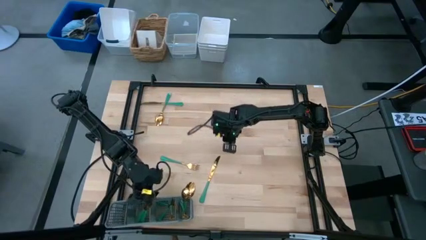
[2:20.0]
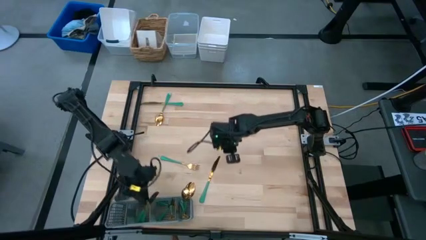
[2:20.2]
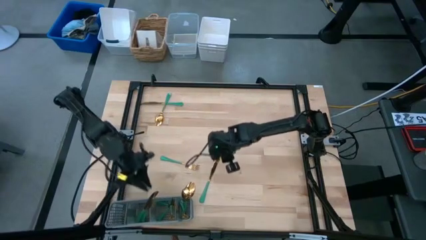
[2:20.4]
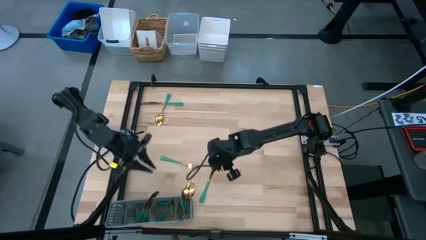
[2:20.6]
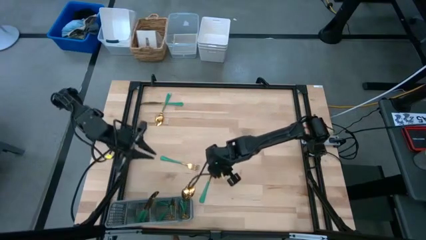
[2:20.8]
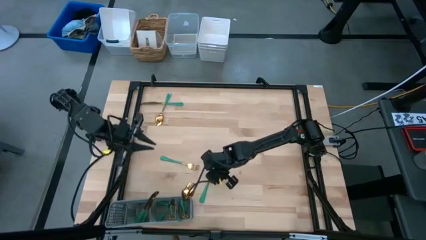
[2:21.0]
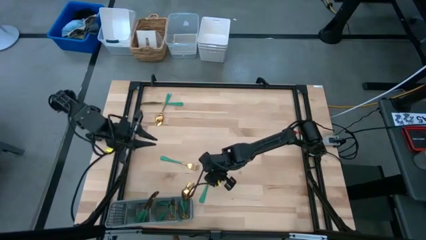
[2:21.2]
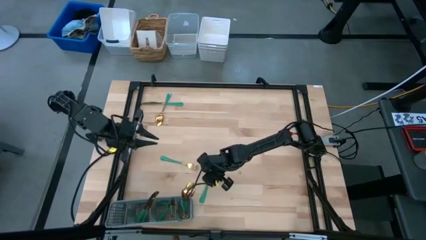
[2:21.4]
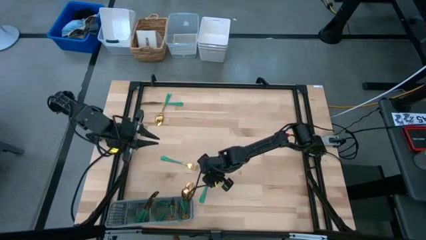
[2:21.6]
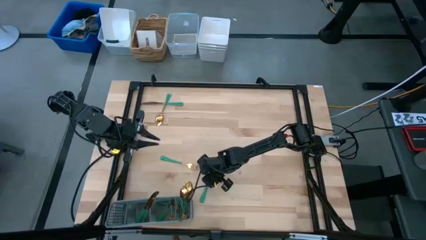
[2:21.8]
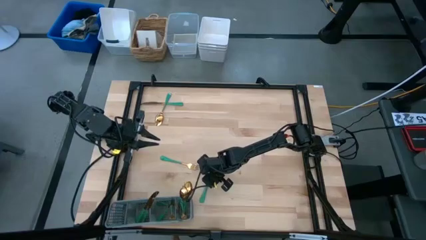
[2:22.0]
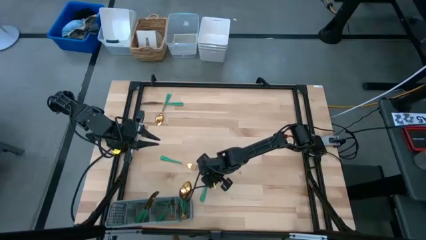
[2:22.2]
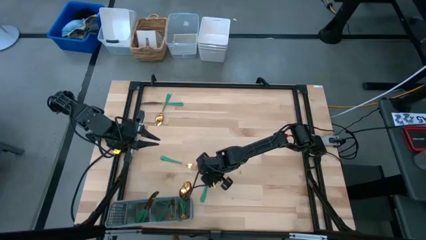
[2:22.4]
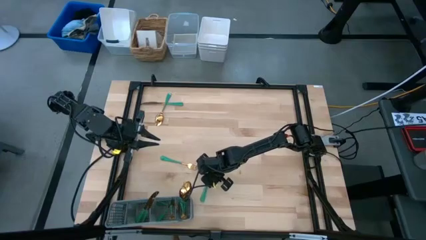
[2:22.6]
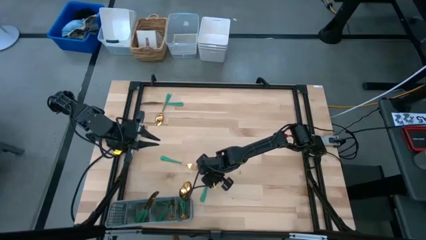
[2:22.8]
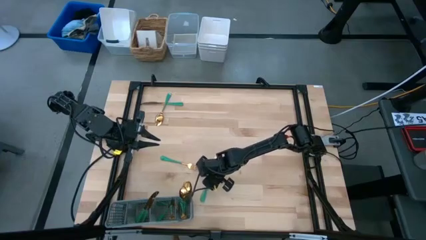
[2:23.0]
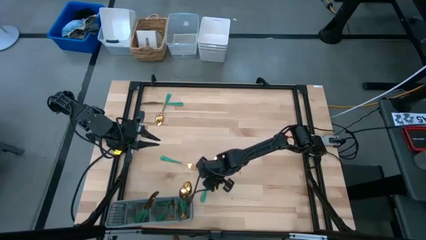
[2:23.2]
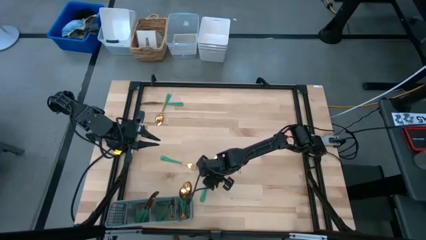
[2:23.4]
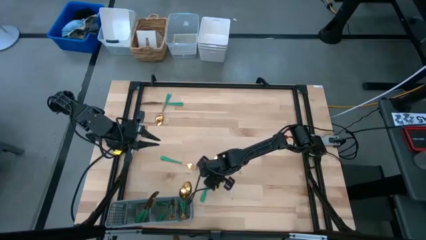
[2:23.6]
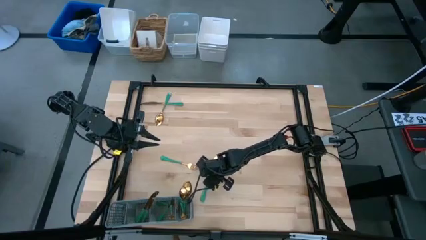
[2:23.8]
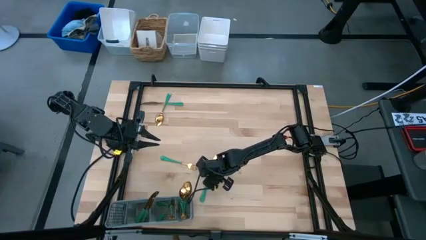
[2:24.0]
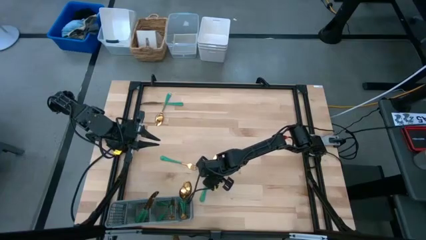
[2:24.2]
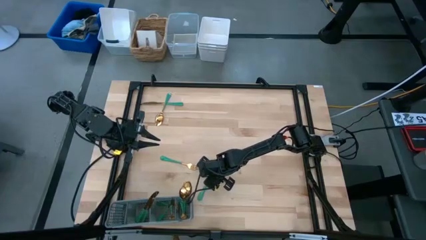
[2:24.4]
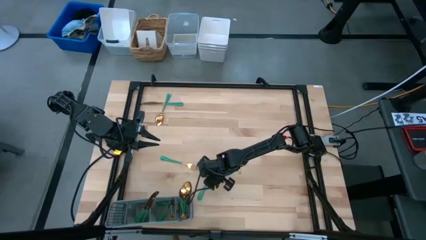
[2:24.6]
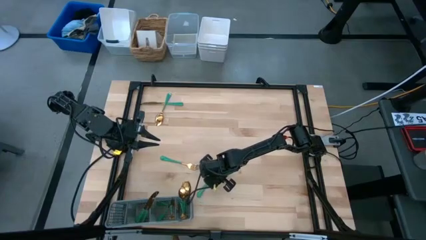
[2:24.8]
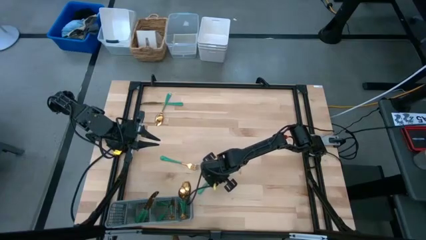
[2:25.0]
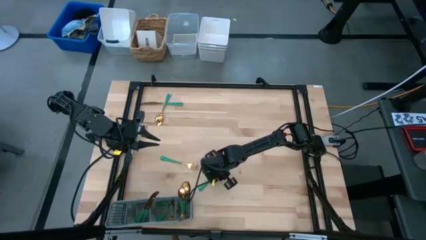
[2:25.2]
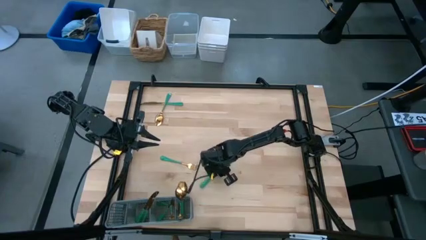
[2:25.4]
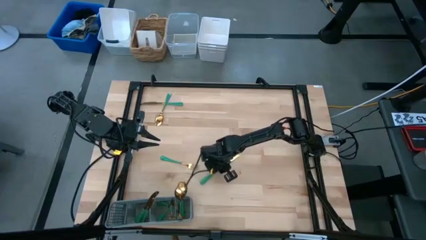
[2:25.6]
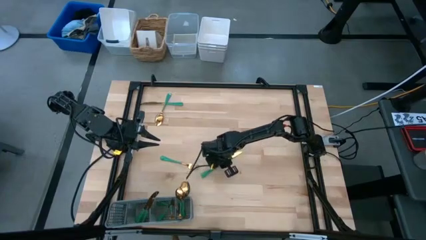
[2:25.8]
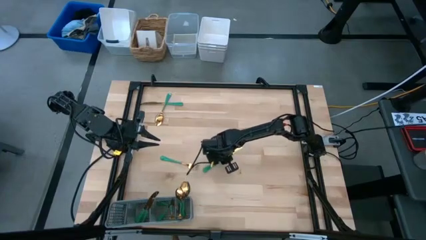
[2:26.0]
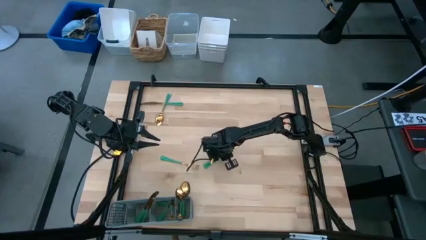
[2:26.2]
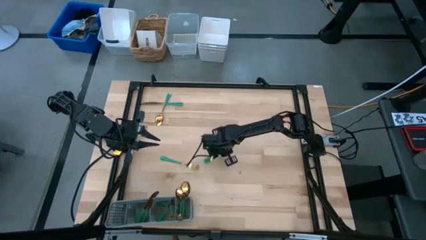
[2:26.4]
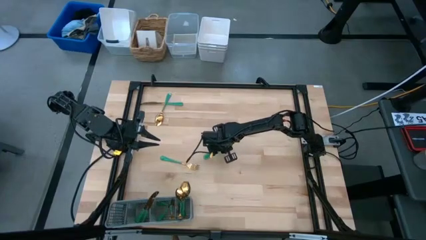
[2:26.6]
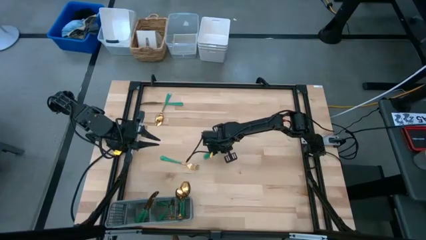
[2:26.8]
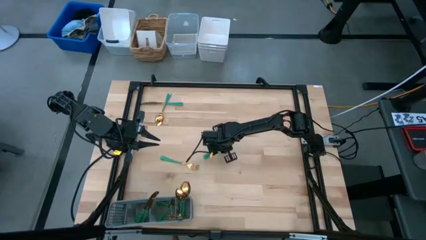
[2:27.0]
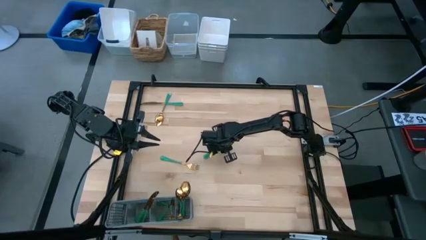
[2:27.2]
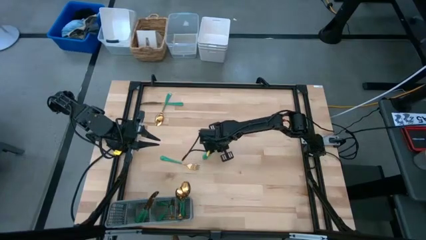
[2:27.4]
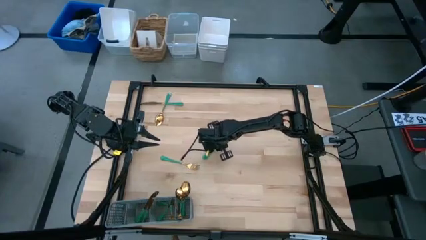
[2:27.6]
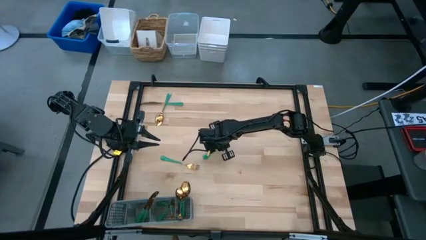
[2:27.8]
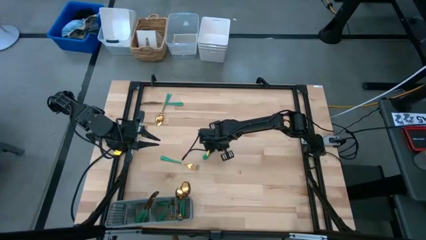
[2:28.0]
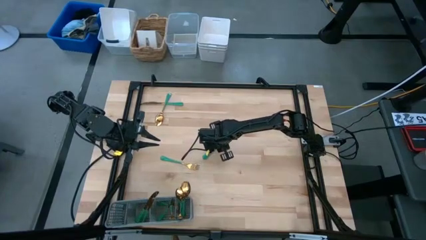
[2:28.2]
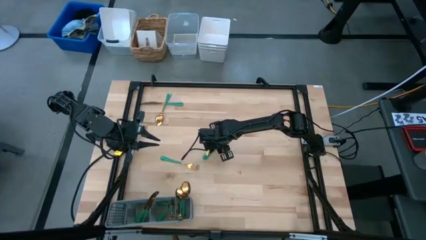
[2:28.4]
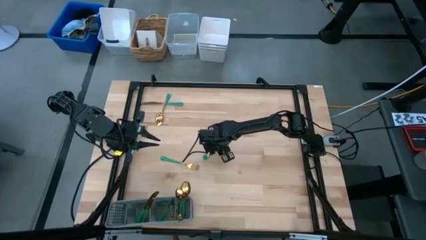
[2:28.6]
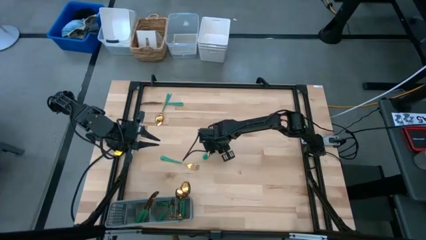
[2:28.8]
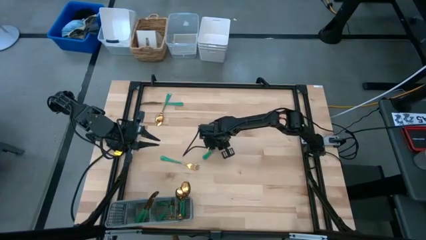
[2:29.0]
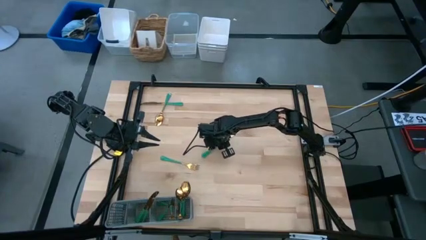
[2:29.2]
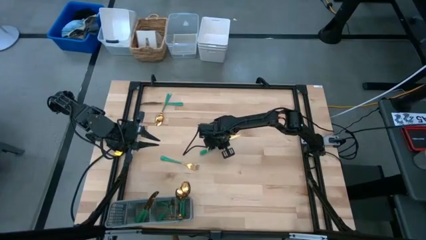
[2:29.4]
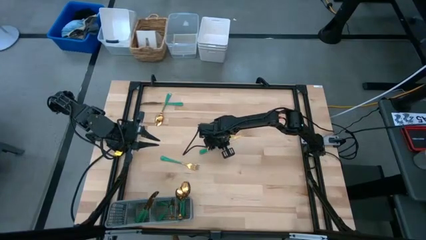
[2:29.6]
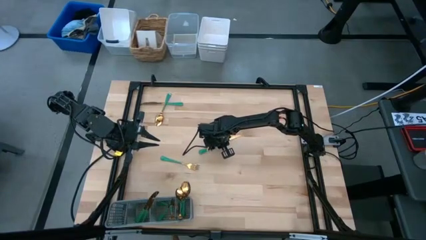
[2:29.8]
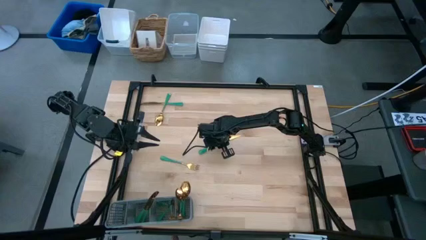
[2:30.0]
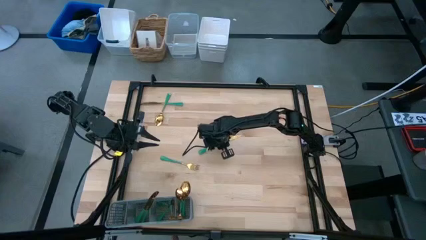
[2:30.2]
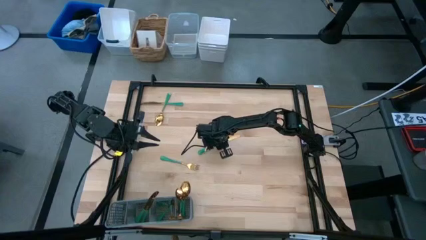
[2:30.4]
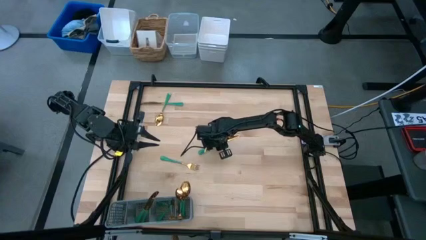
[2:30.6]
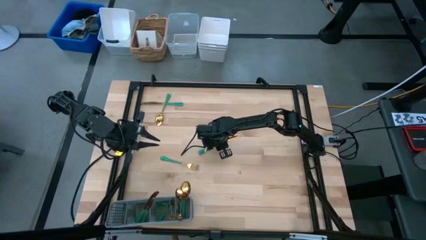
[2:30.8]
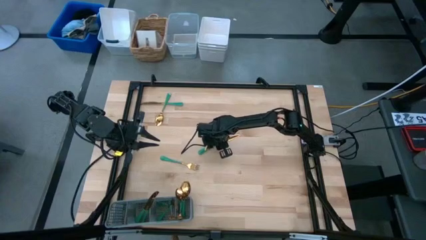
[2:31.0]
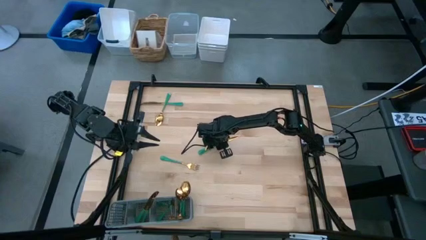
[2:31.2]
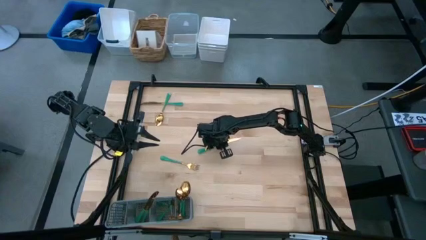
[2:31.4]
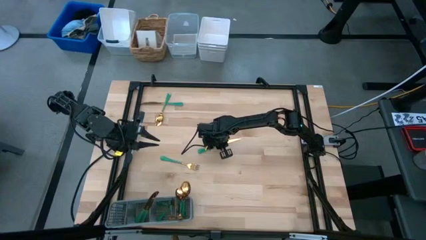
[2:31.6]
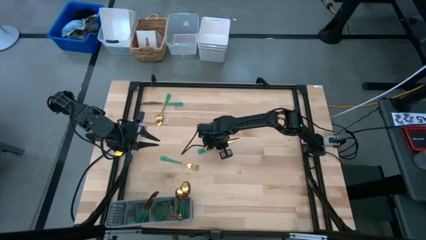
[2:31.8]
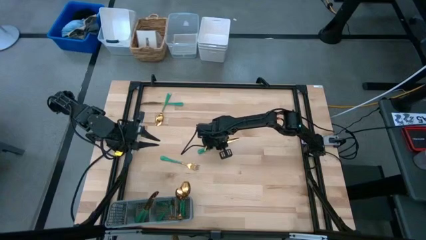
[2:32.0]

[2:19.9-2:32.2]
Task: Sort silverware
Put the bottom knife into the cutlery rack

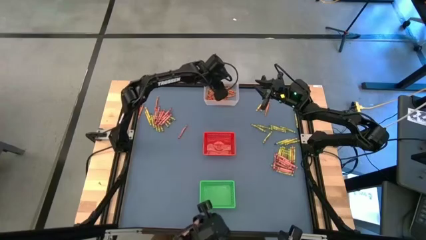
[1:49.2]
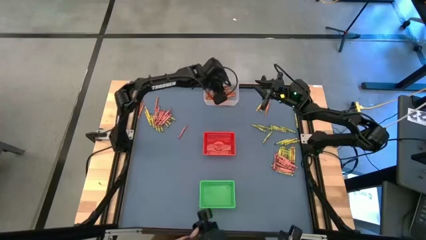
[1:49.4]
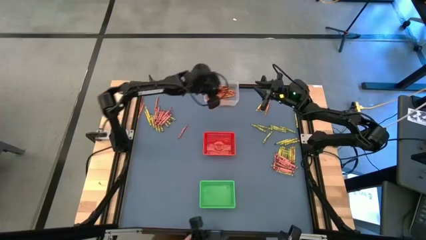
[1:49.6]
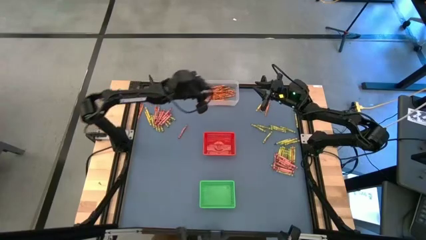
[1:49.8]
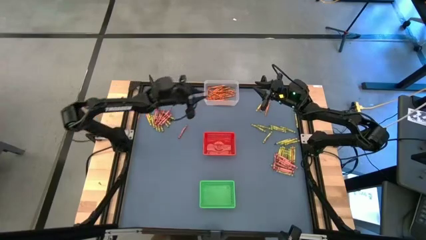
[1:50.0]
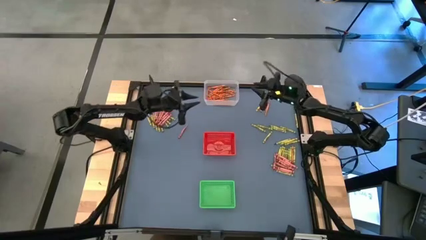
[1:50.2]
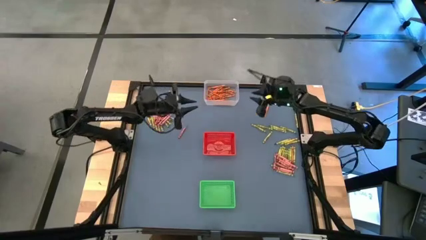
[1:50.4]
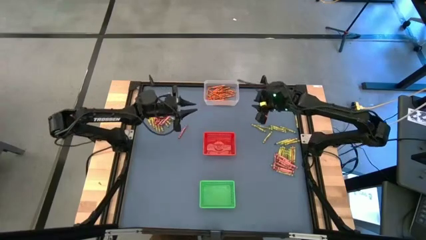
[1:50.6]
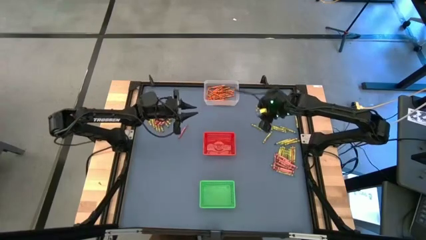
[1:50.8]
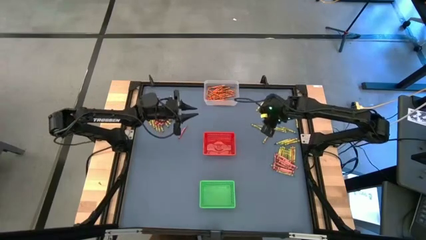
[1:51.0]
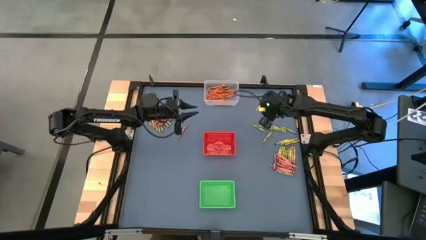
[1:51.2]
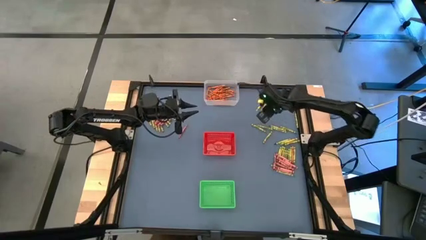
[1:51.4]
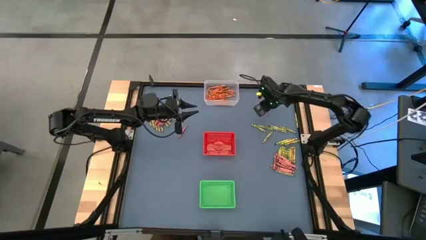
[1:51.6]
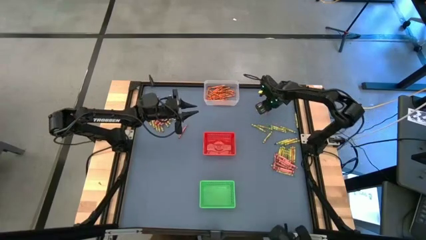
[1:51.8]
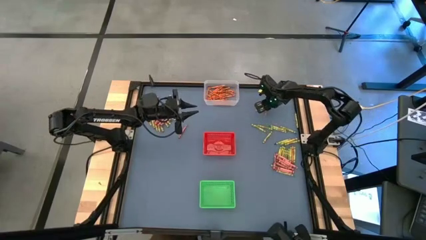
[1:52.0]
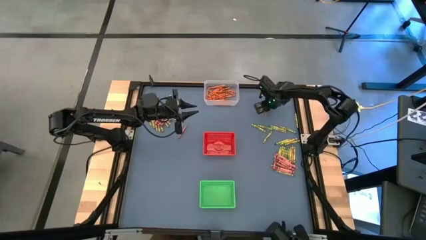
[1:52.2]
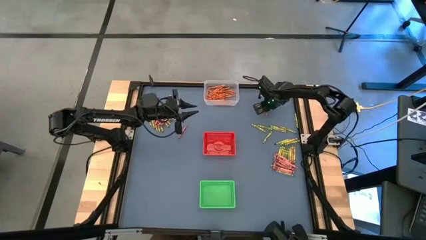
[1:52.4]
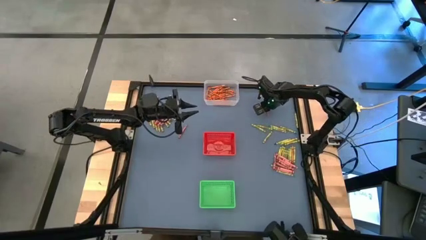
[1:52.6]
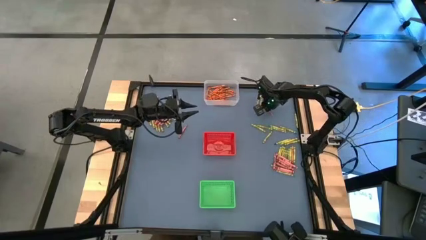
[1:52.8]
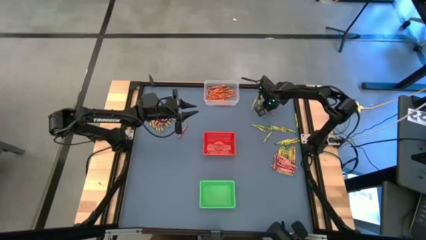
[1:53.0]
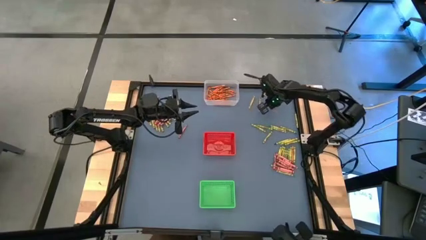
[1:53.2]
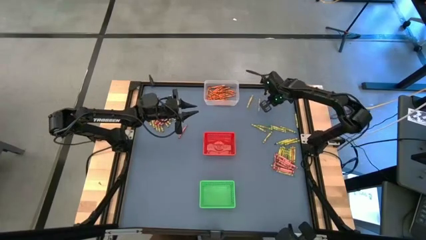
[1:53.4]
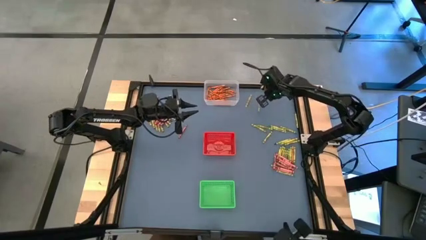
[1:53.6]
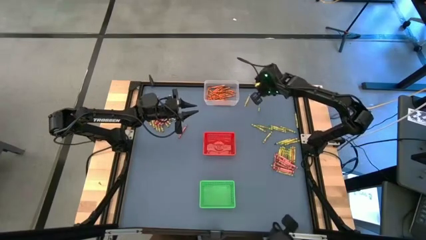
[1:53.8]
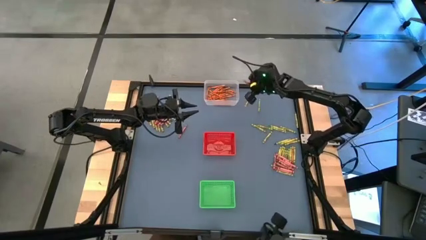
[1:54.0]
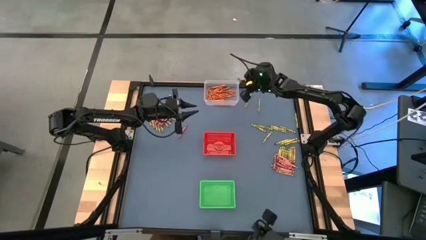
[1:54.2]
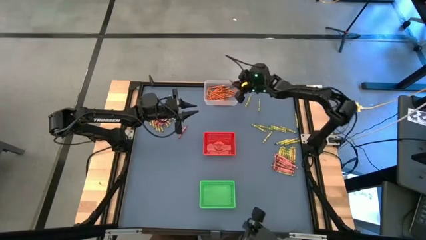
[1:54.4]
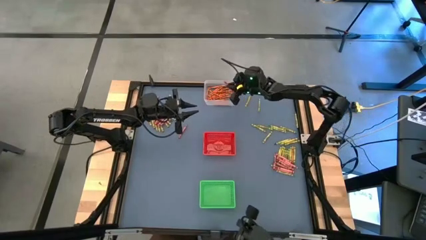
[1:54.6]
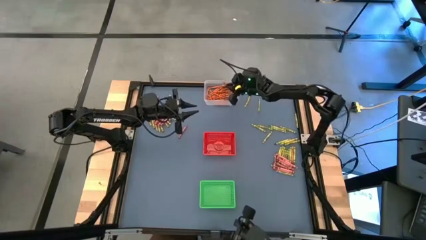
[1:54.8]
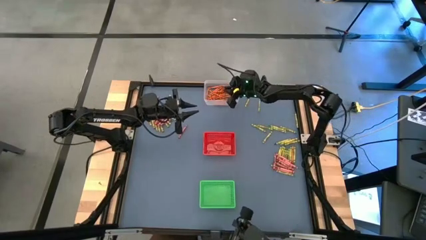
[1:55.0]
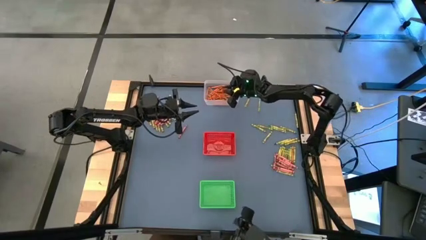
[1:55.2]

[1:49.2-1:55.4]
Task: Sort crayons
Put the orange crayon into the transparent bin
